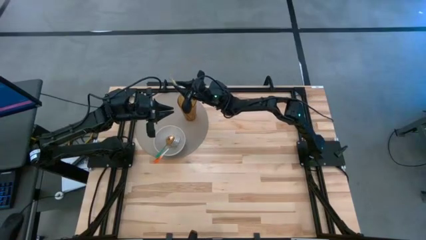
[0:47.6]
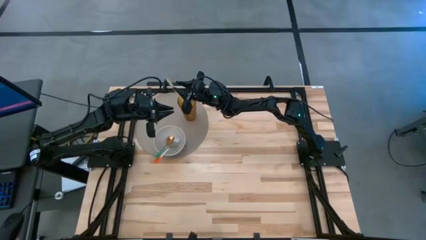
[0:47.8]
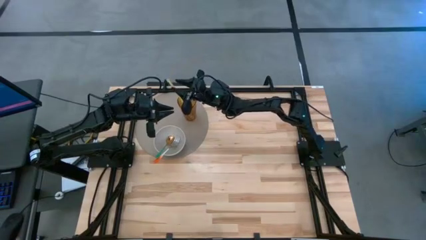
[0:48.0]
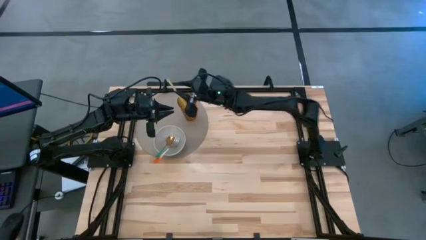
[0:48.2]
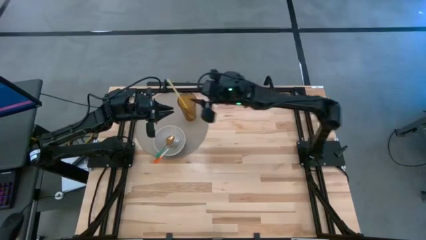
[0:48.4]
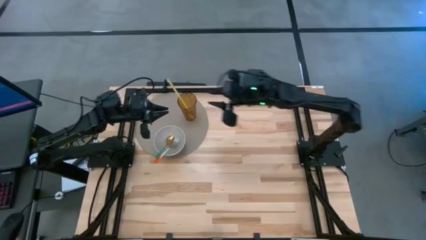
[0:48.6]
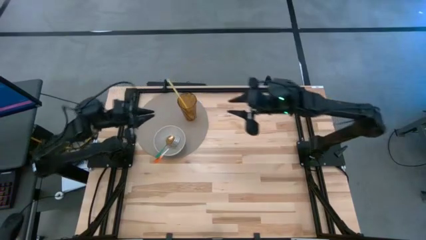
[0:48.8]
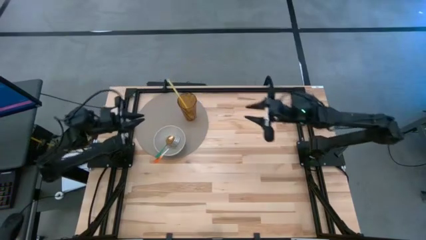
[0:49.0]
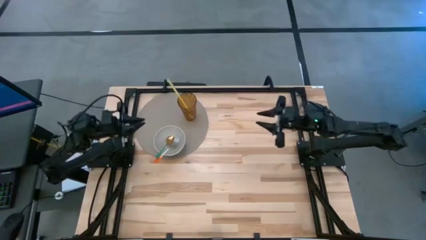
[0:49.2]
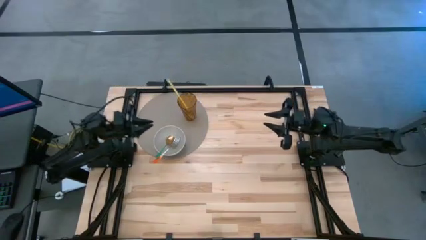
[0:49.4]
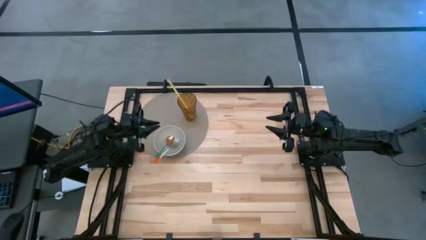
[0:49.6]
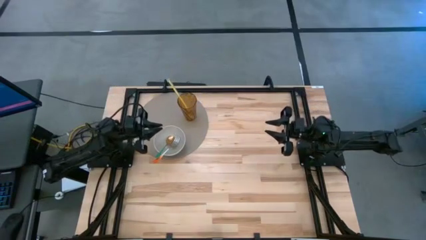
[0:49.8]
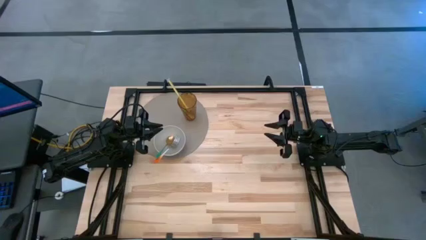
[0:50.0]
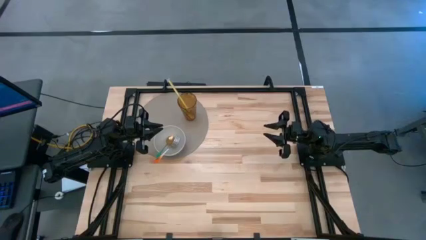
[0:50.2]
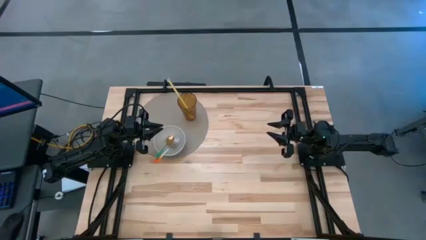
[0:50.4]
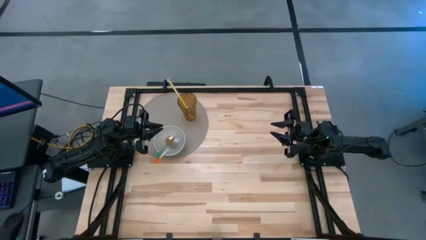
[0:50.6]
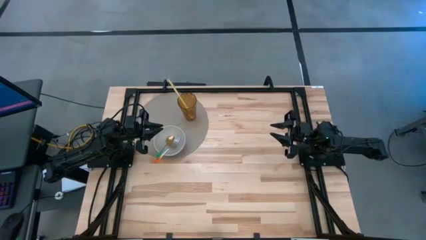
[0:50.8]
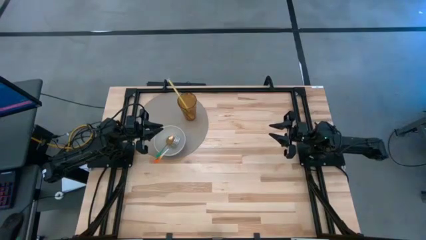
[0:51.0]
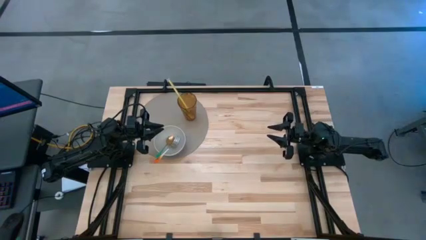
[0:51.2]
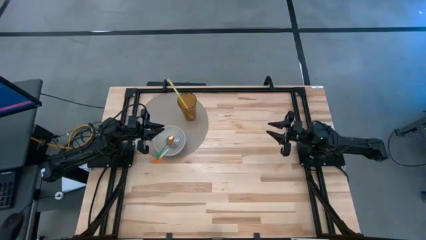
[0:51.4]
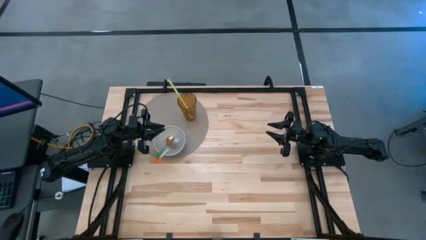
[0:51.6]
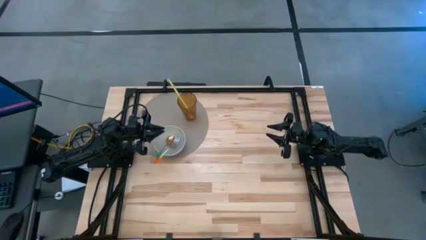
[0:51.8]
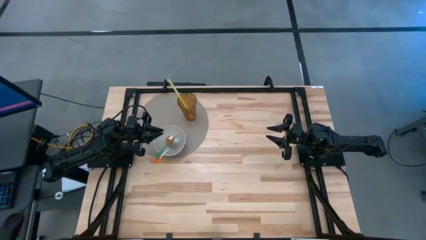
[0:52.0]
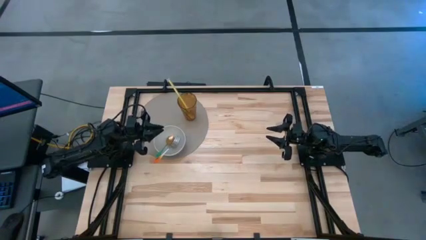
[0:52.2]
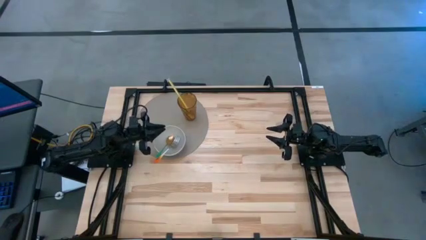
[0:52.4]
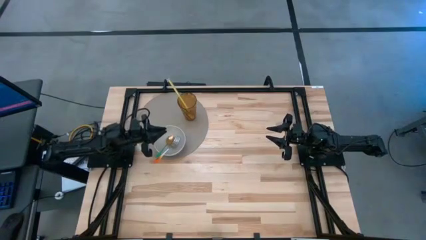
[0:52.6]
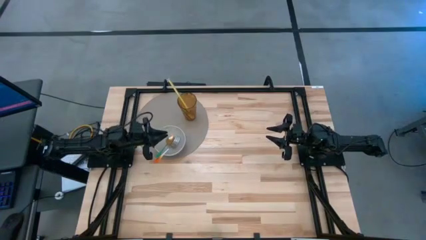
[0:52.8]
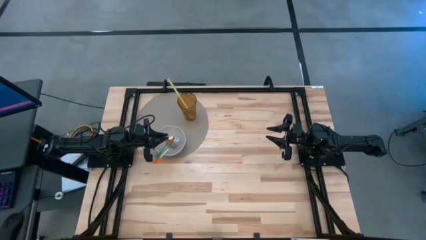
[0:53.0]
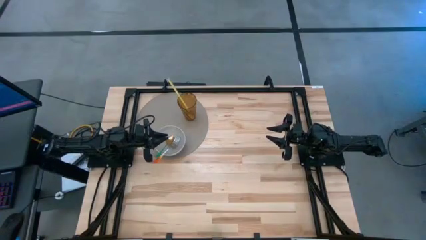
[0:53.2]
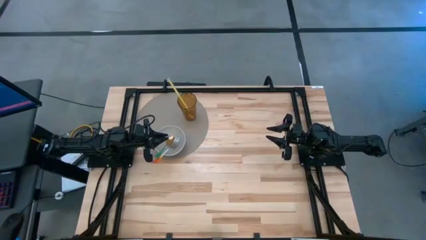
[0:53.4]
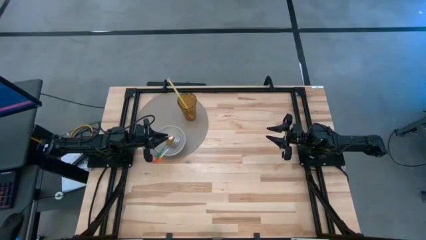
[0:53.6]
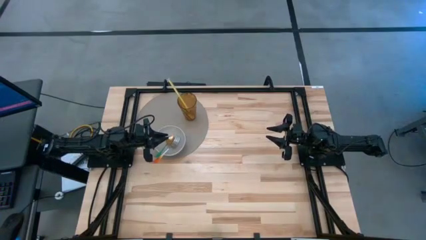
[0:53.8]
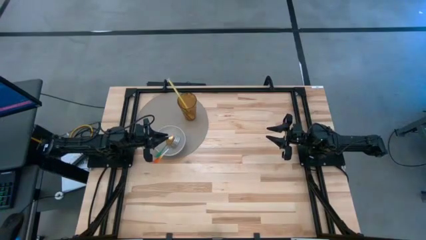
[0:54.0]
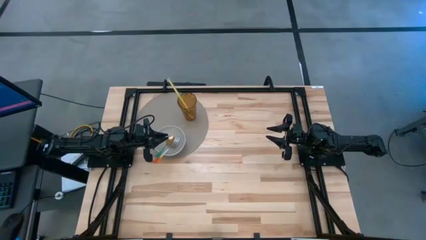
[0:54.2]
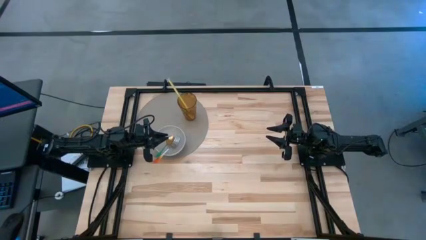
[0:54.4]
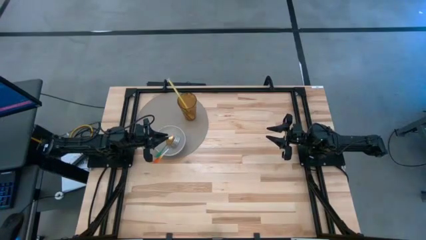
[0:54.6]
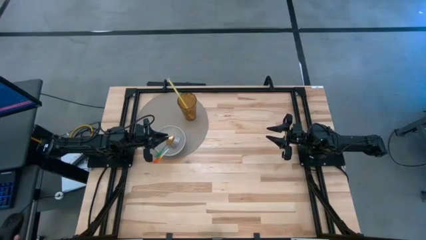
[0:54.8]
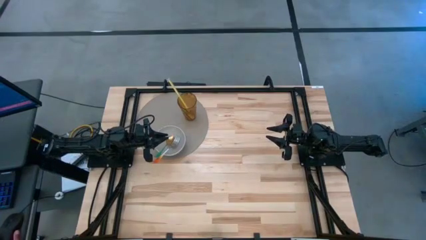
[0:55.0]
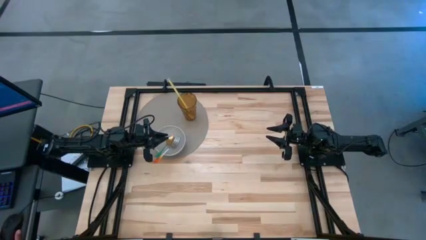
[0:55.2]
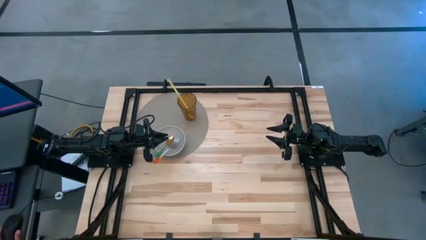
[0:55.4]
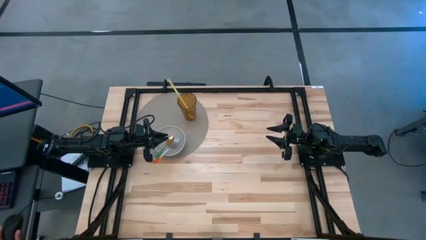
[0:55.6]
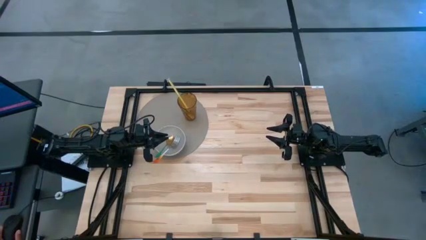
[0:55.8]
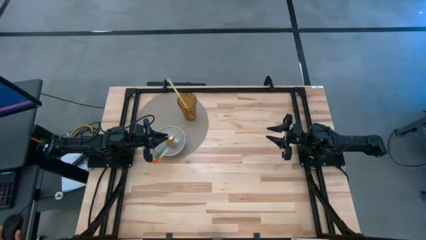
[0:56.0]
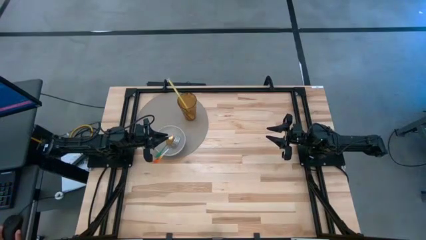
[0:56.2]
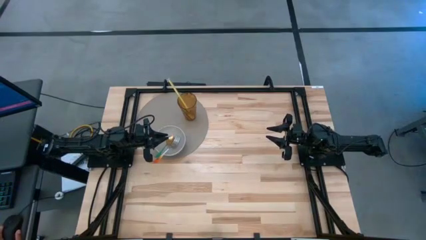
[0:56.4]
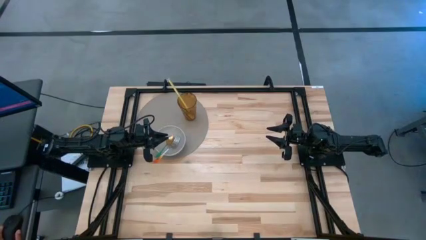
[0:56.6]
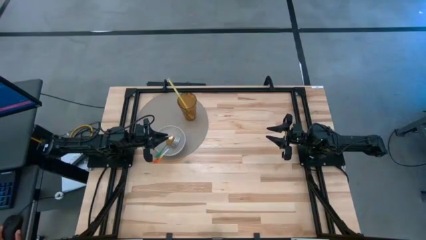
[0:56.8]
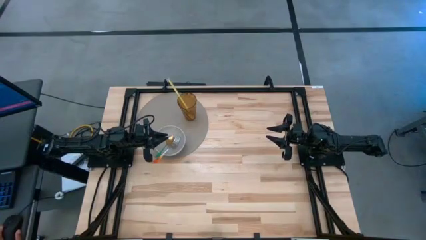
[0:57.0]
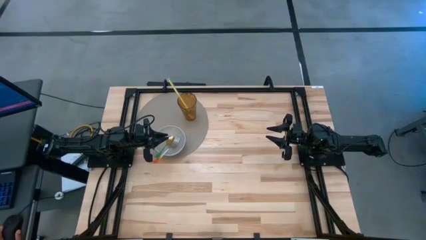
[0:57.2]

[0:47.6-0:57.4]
Task: Pick & Place Utensil
Return to Home Position

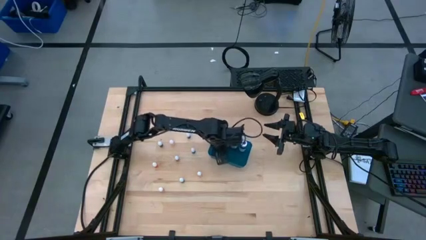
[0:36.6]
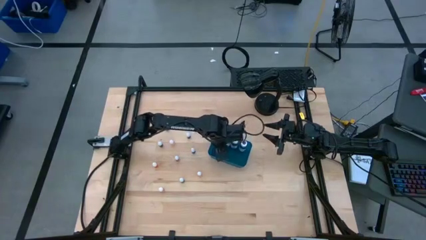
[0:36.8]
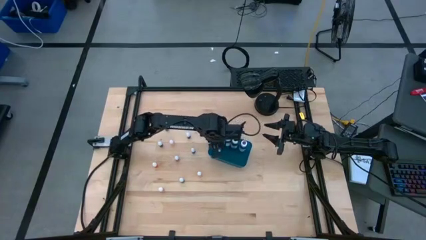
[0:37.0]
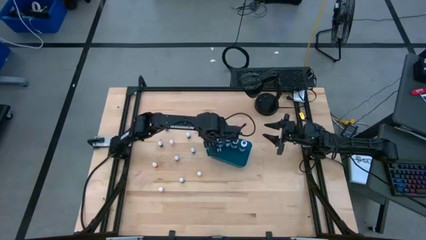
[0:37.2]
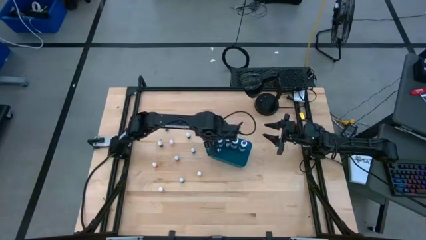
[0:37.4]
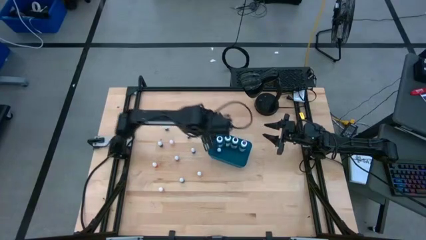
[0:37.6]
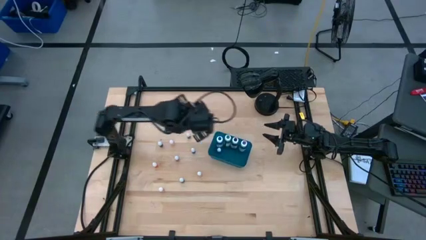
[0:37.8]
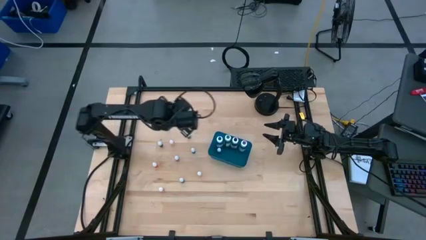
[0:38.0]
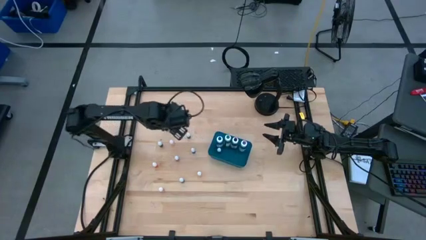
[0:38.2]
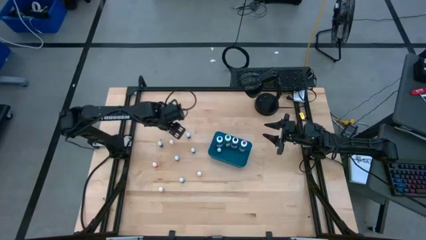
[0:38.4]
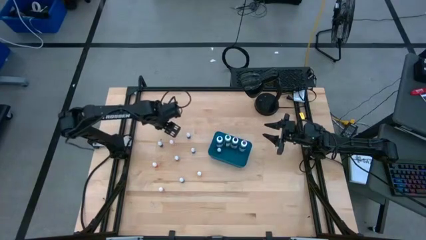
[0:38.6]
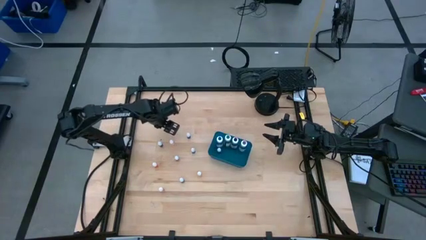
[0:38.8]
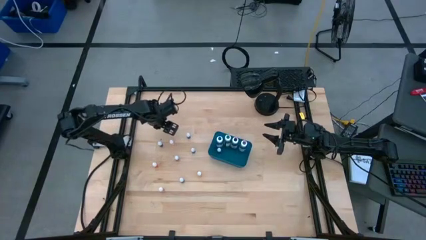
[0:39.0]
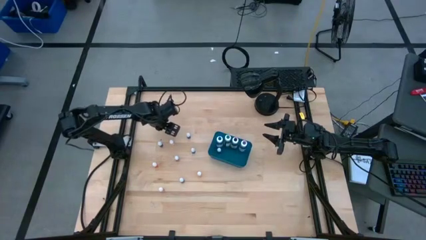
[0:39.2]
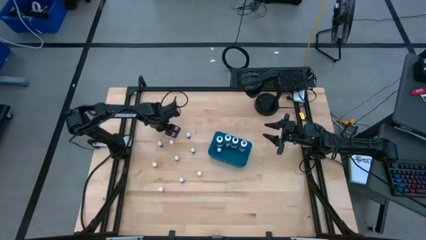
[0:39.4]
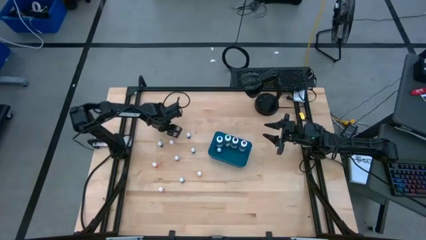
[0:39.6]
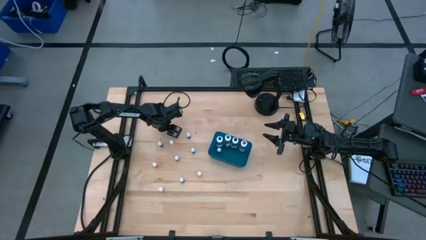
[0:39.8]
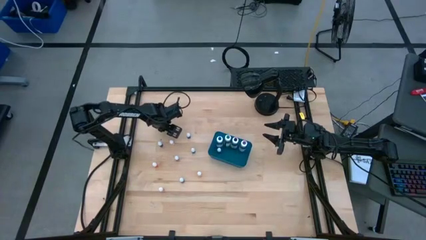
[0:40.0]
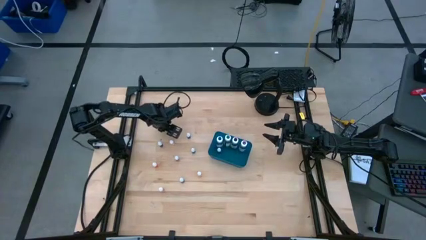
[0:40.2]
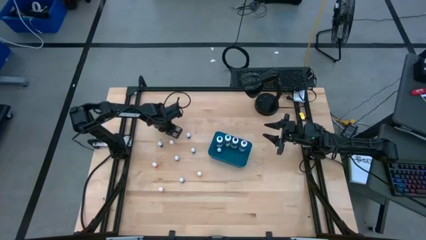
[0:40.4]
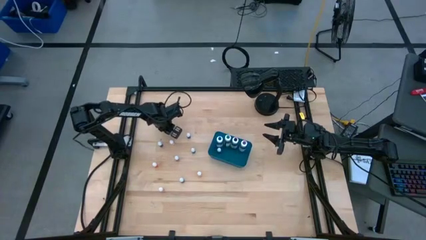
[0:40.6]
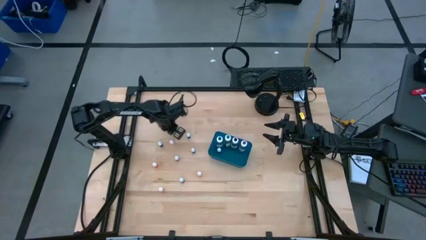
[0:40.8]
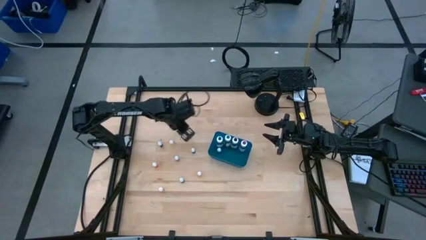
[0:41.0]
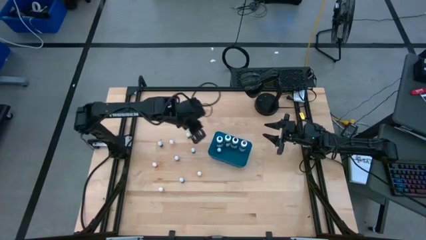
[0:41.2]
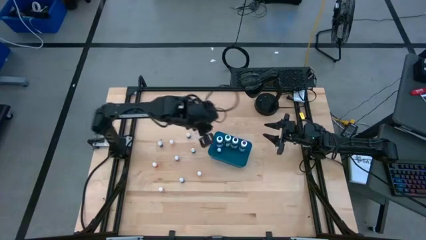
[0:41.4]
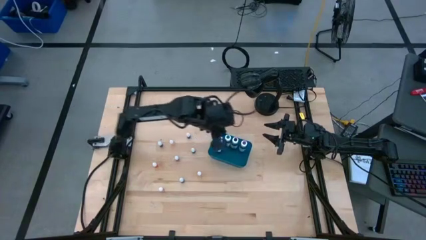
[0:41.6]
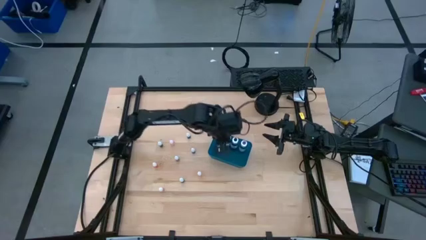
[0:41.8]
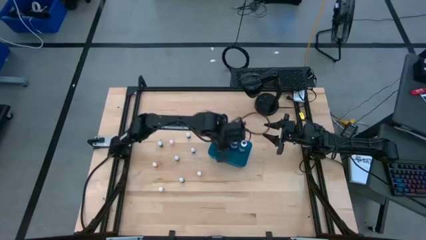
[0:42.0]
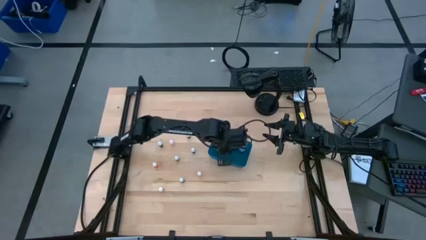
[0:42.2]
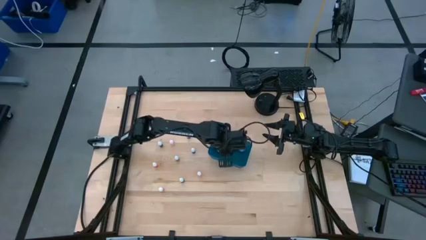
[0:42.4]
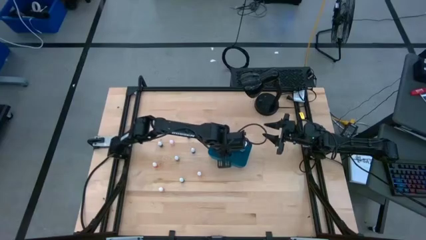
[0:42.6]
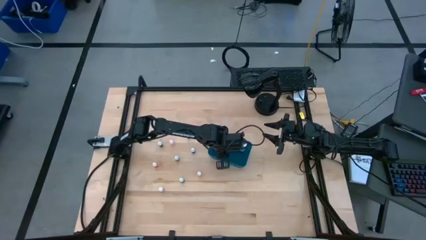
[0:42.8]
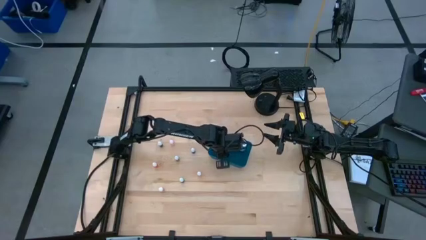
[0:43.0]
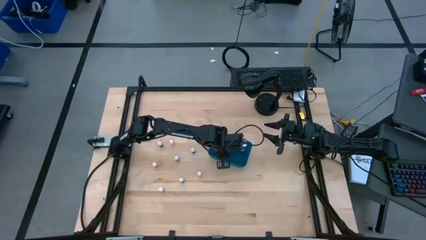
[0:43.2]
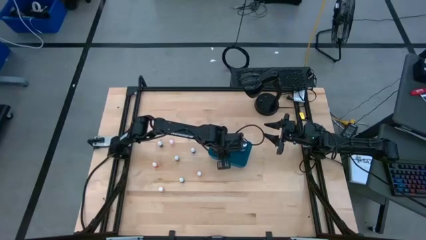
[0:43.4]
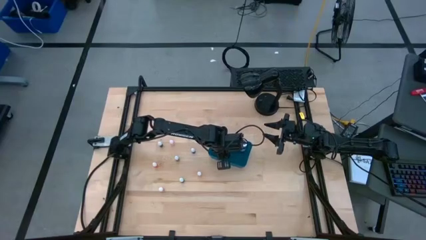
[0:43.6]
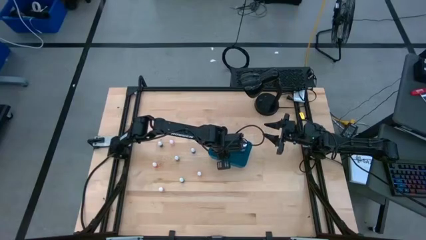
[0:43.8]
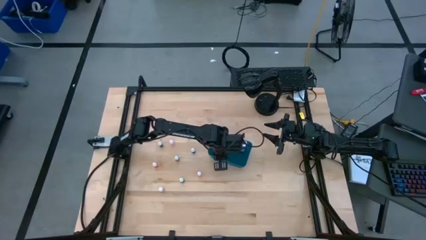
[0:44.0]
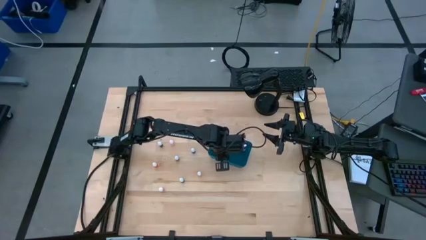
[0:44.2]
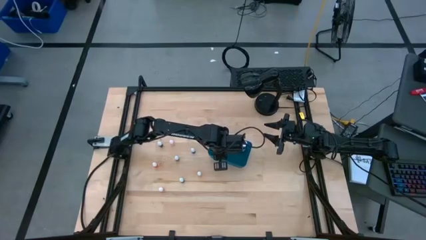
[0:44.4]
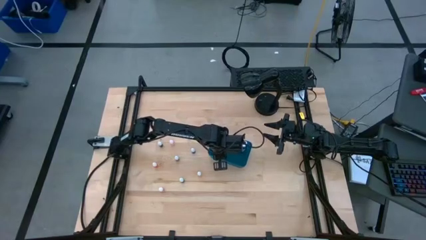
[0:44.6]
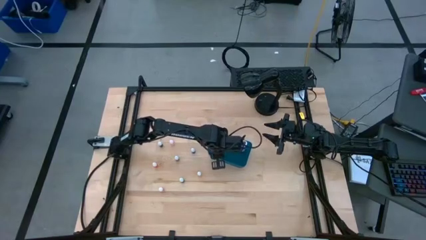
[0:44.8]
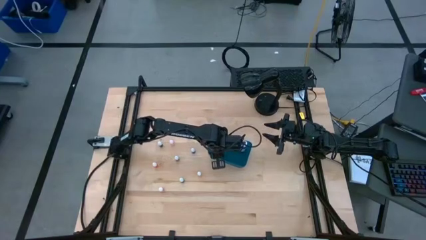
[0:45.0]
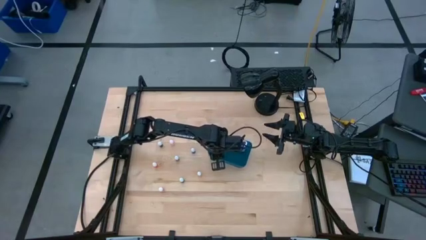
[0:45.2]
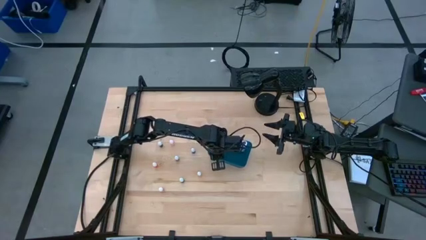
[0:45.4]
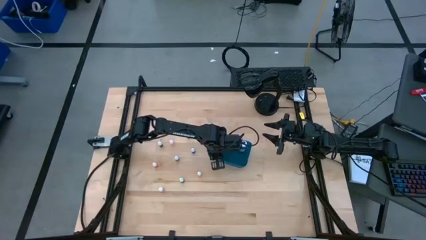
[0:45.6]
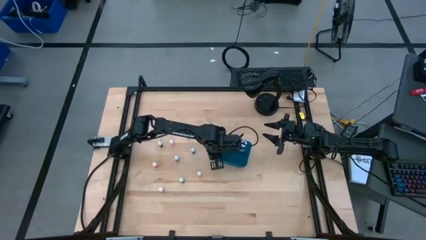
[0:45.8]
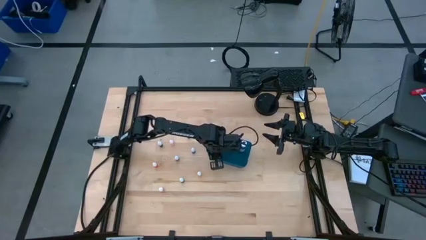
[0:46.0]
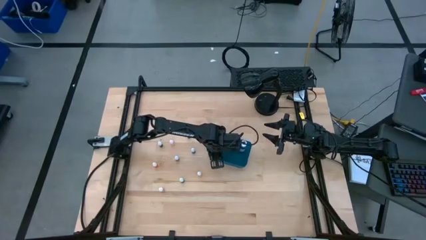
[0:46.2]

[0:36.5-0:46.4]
Task: Pick & Place food coloring
Put the small blue food coloring bottle into the blue container
